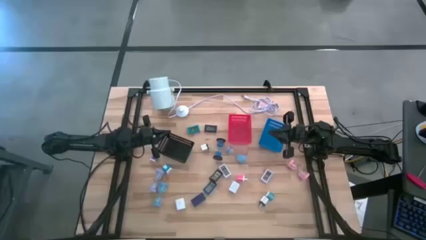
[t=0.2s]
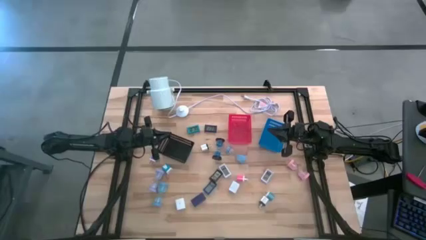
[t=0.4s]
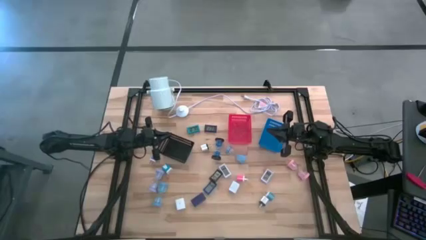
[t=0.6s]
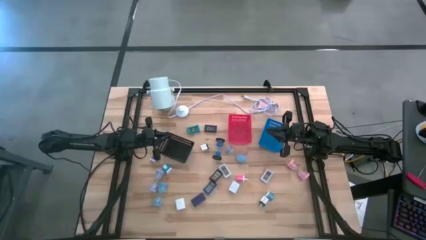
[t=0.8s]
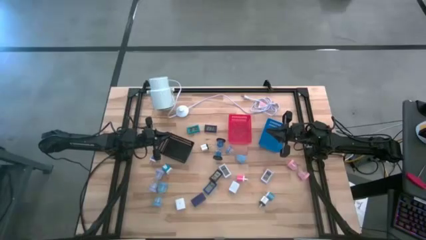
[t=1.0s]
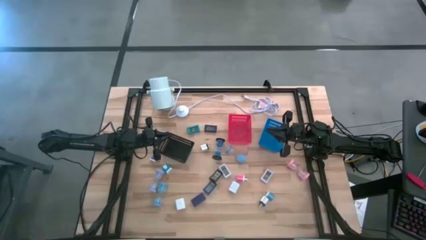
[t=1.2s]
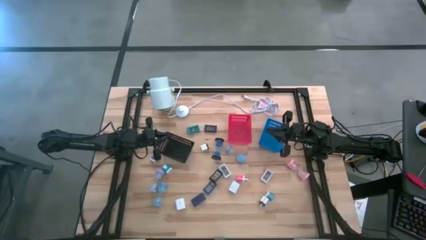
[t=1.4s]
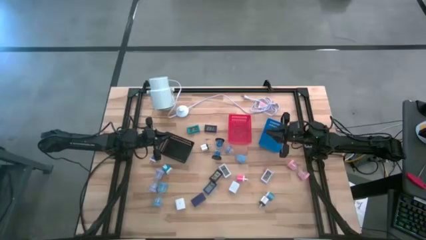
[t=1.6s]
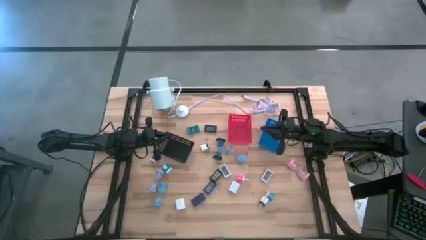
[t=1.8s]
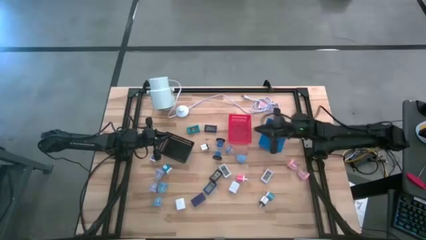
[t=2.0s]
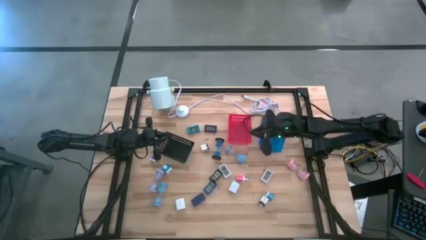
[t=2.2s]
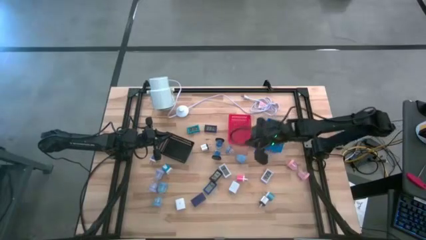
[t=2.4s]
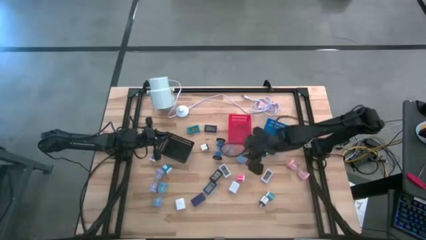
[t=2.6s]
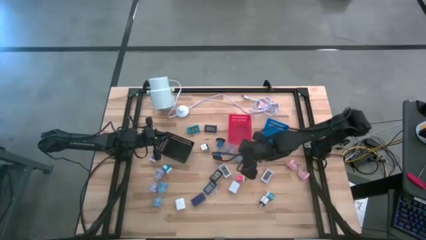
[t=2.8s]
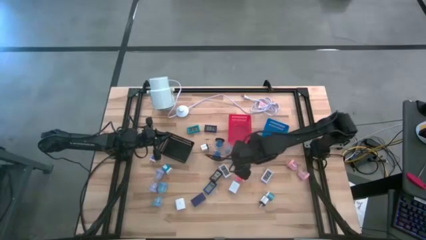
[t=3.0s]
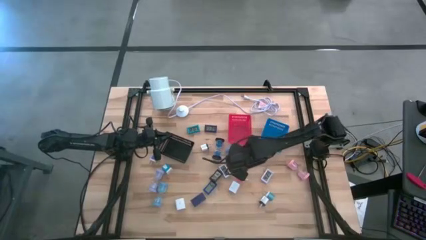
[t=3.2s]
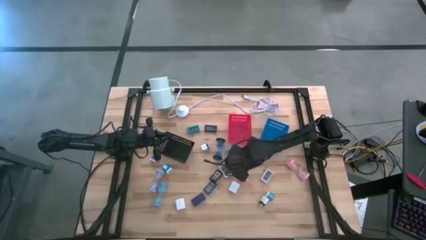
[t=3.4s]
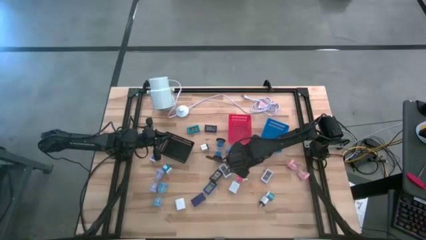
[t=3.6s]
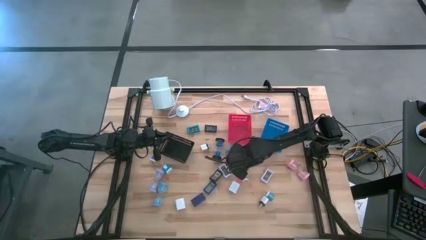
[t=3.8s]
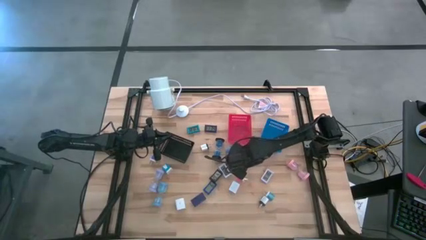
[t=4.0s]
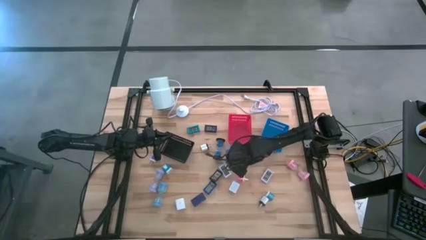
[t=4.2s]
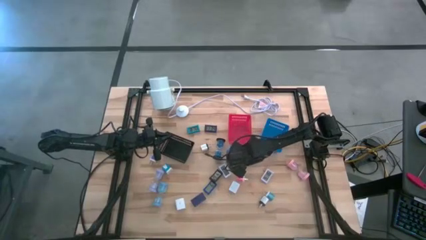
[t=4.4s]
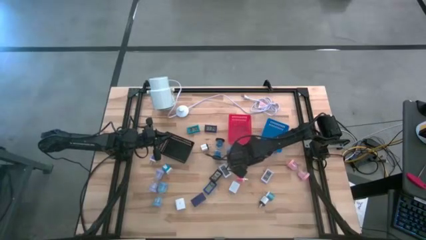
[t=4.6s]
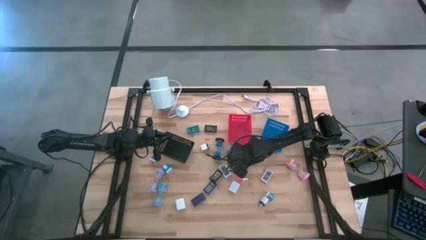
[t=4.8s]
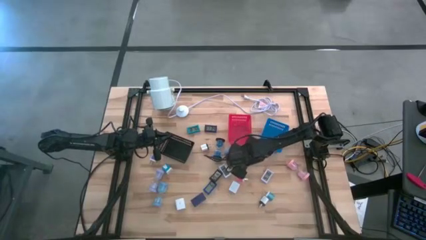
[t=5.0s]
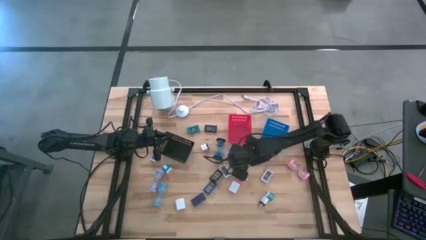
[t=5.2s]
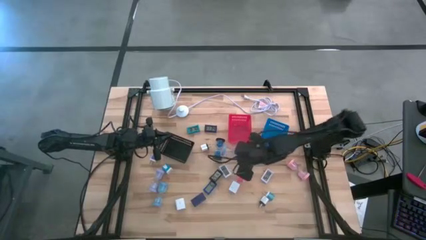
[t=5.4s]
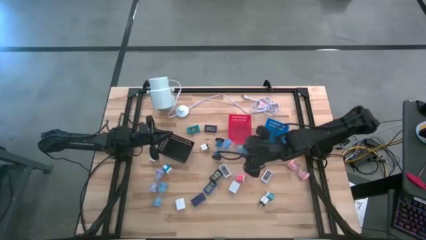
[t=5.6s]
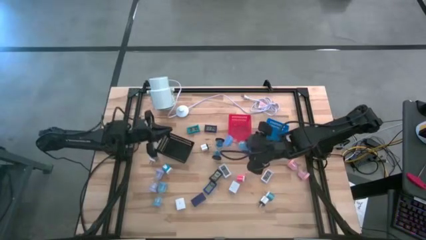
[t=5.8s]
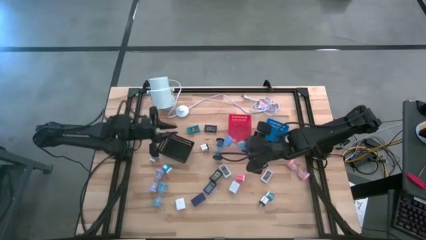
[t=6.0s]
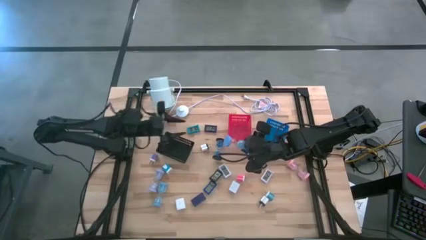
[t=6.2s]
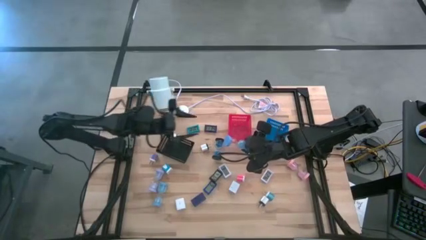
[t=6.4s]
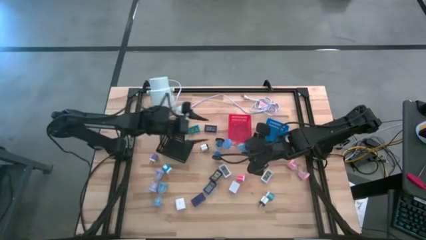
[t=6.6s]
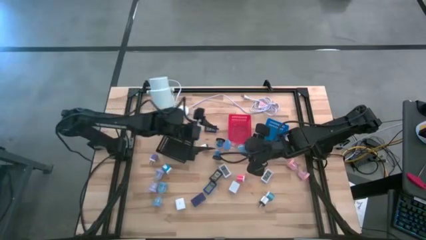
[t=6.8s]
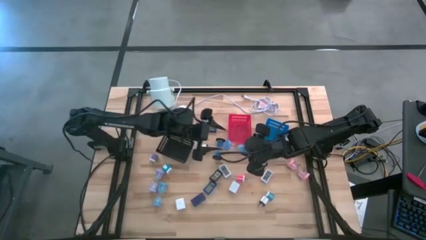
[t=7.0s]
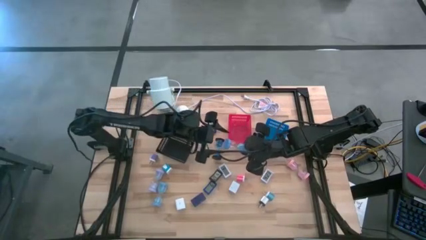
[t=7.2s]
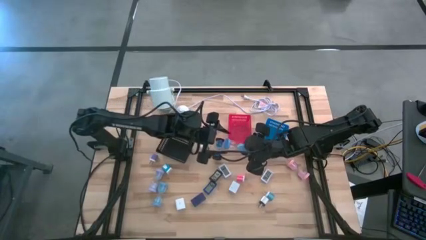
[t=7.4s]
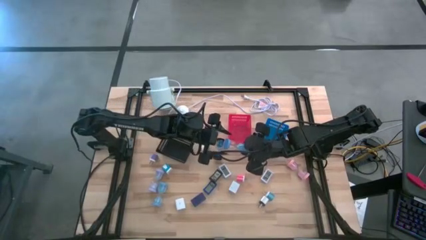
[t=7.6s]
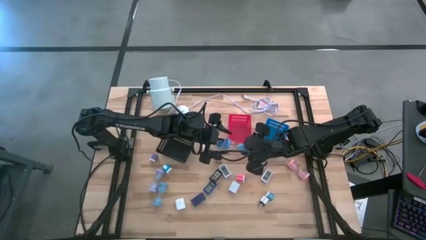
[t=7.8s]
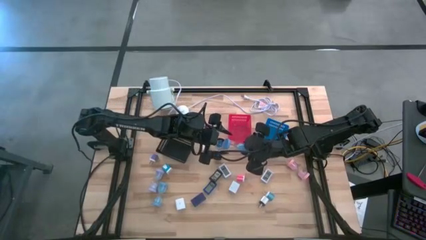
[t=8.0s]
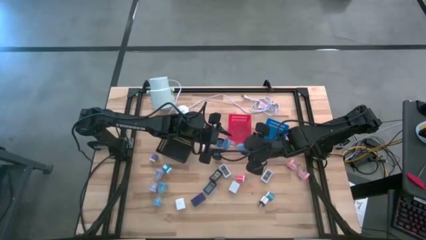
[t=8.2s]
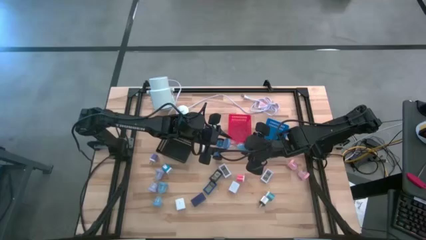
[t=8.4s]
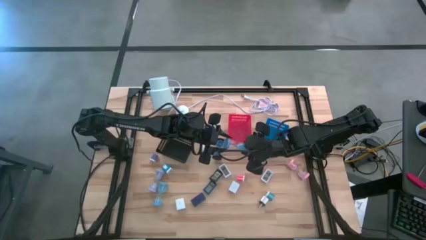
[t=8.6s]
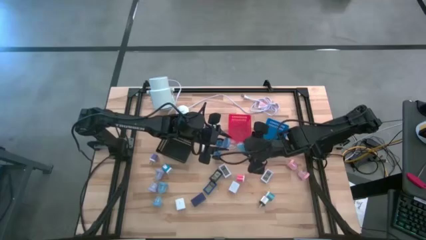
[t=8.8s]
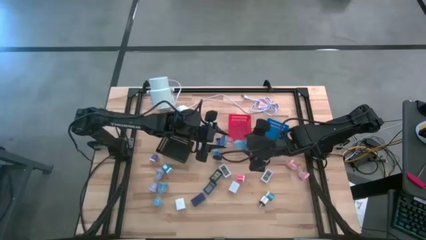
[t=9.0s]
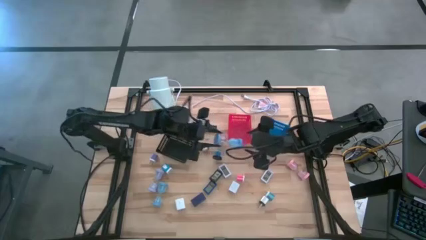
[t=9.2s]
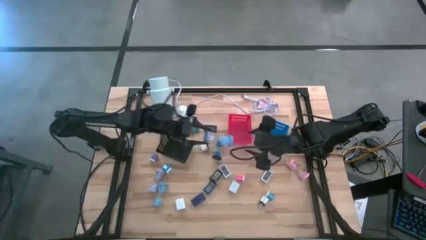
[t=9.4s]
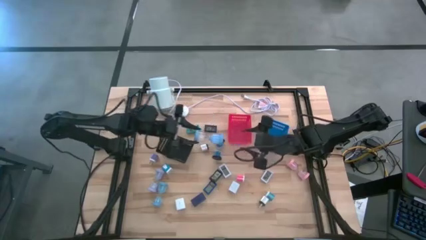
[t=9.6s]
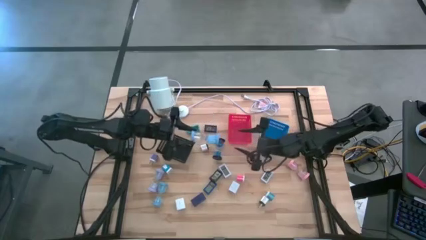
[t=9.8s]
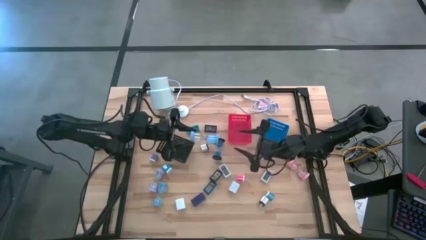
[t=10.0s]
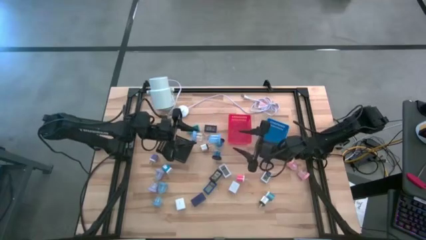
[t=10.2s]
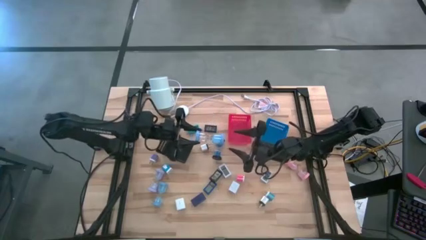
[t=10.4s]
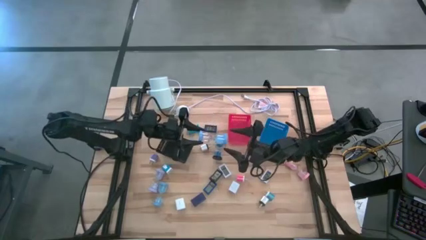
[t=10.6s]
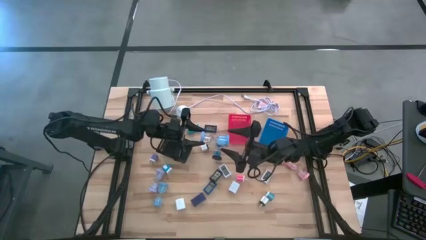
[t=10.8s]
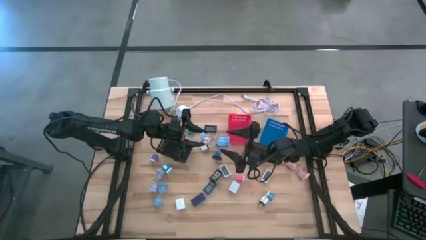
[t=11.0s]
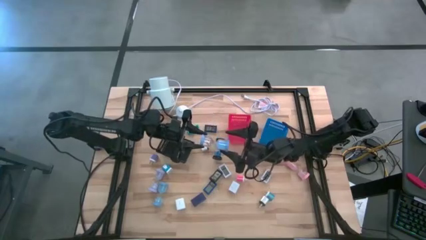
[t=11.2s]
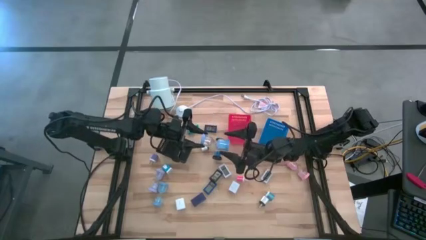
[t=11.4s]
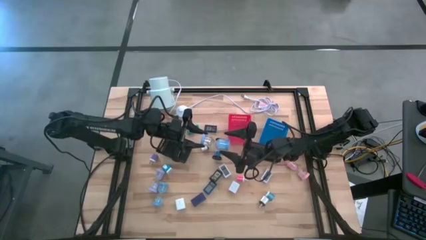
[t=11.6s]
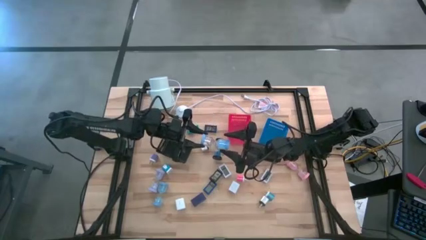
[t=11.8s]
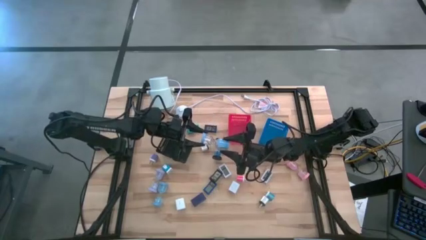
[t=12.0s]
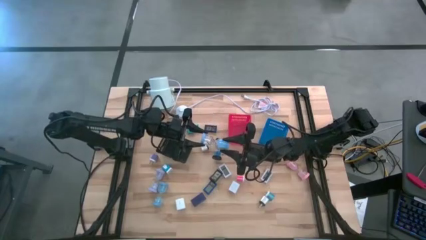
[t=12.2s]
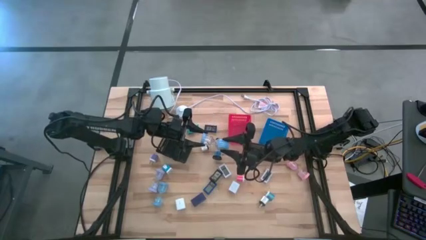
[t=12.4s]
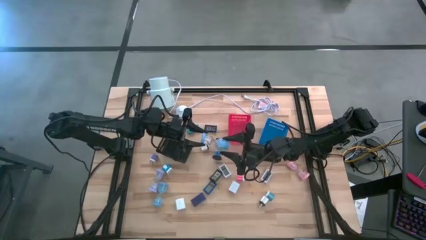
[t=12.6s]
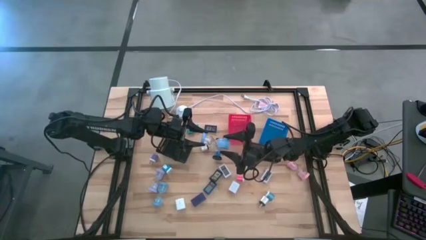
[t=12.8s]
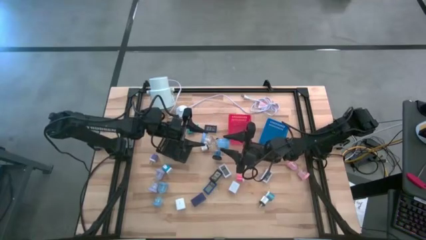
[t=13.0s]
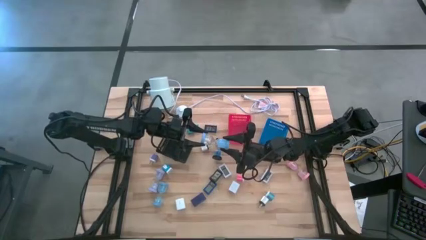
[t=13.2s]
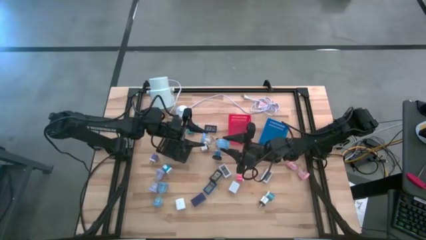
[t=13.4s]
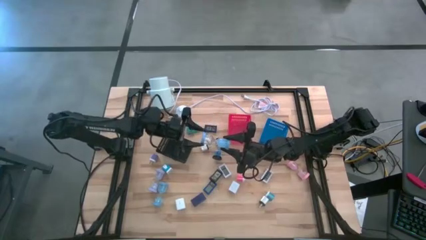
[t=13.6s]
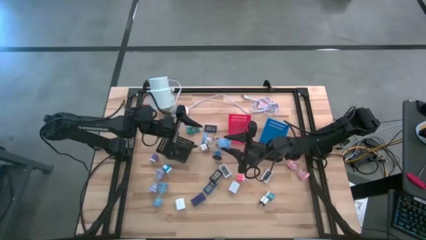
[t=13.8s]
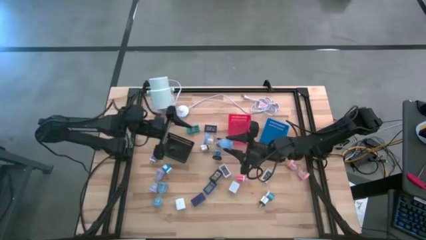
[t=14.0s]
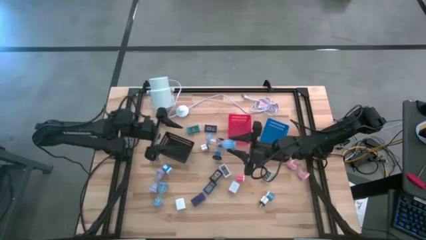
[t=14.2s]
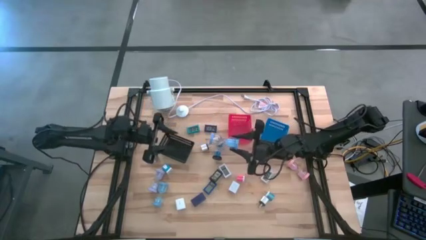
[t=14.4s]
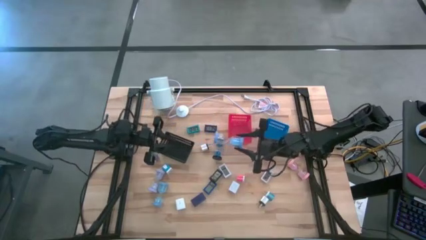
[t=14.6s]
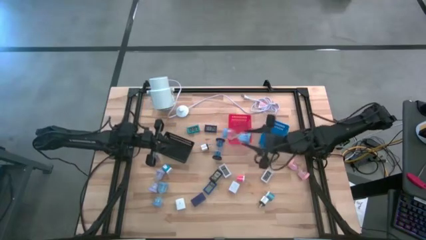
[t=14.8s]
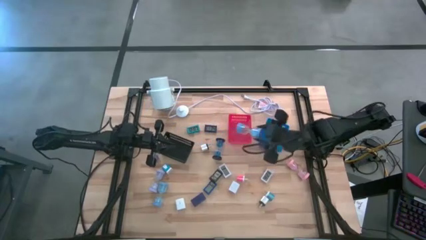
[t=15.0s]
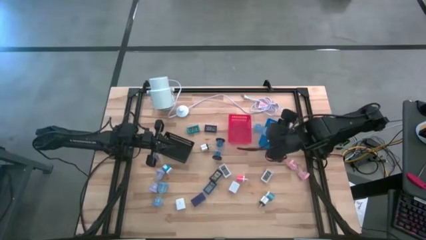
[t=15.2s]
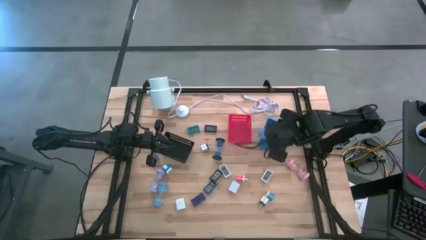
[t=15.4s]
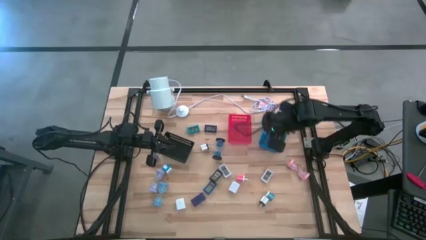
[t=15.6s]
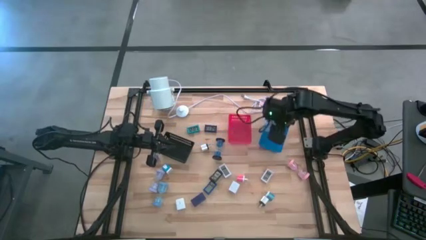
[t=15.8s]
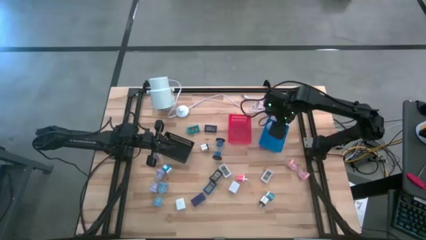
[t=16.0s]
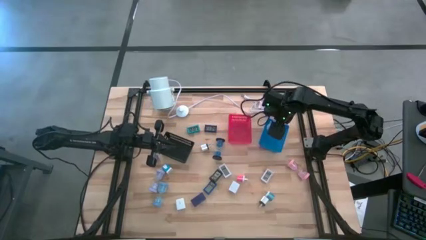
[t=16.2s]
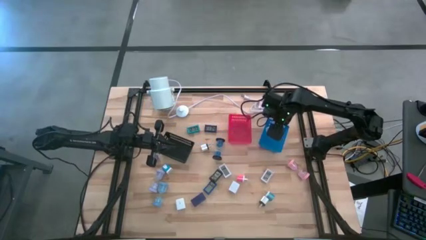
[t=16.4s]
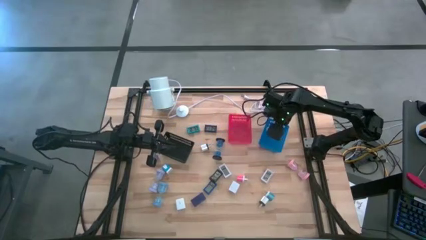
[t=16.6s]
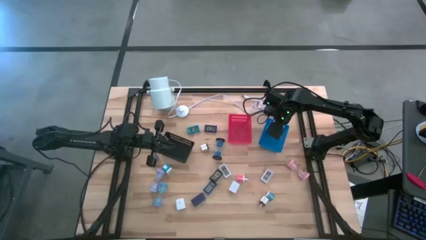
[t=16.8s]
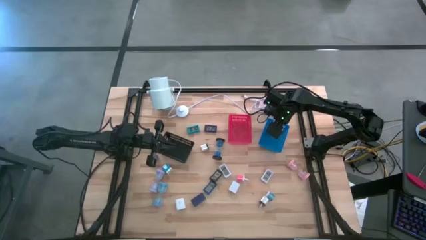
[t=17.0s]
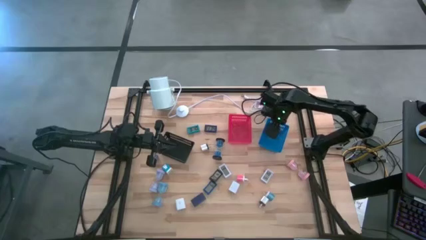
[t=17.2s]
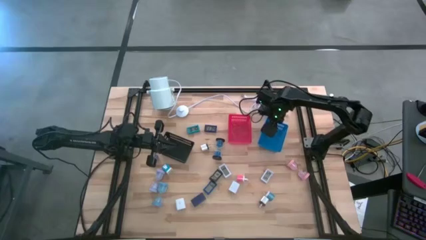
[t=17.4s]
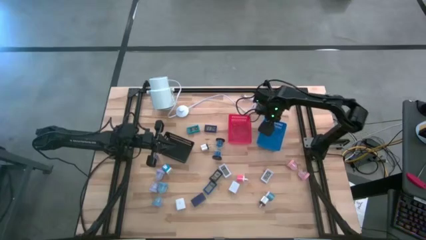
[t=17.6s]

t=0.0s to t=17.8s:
Task: Pick & Place Office items
Put the right light blue hourglass into the blue bin
